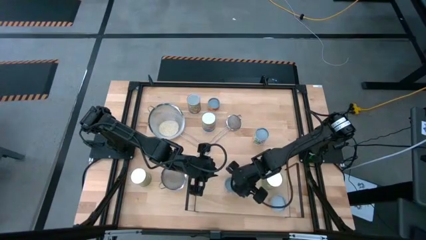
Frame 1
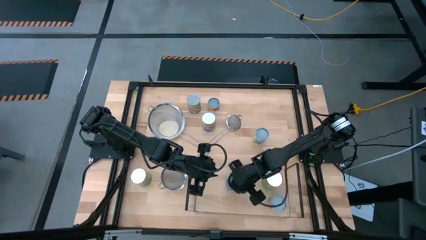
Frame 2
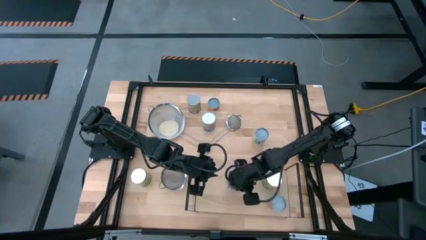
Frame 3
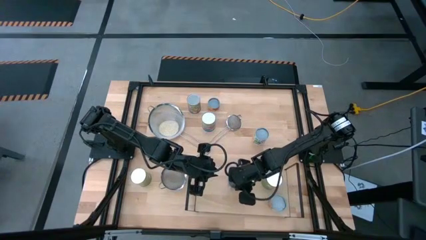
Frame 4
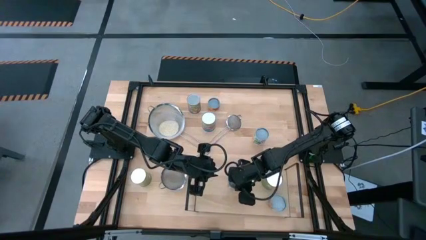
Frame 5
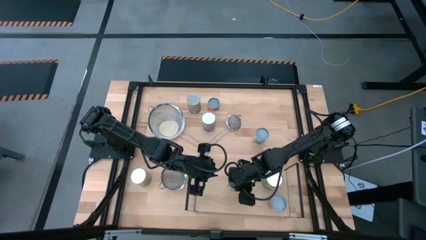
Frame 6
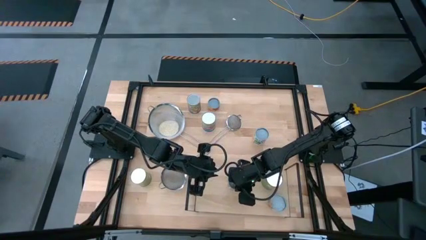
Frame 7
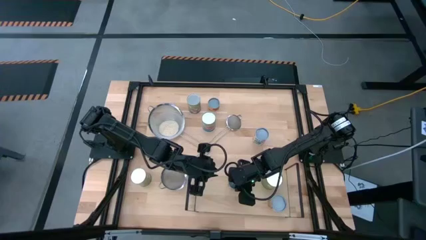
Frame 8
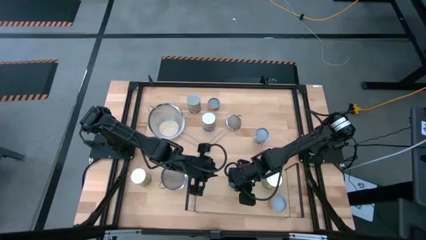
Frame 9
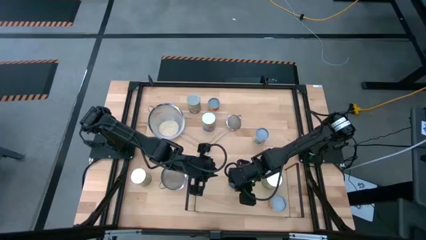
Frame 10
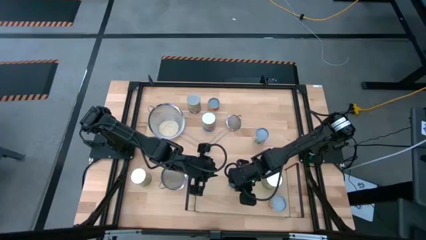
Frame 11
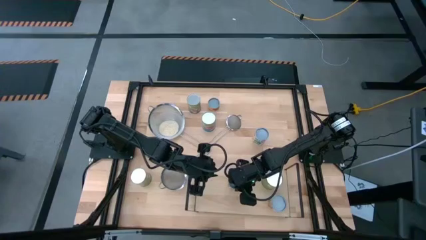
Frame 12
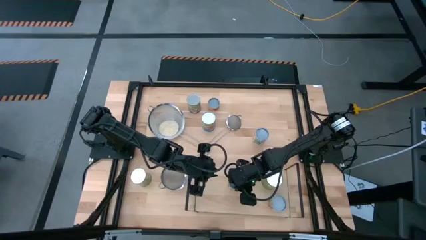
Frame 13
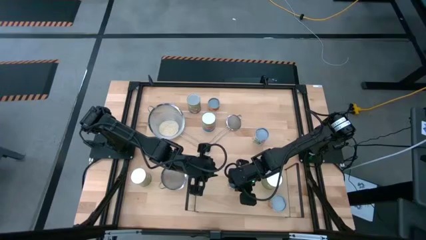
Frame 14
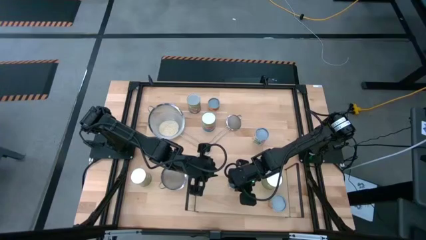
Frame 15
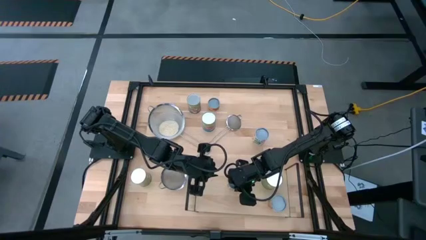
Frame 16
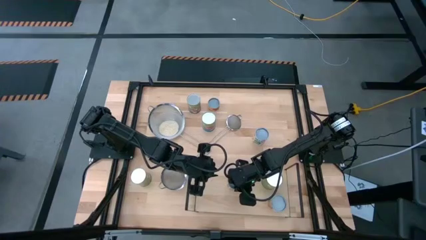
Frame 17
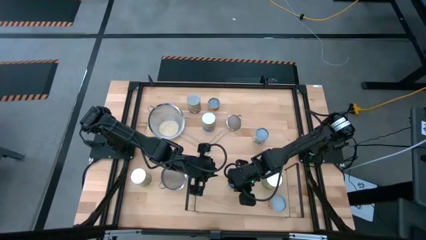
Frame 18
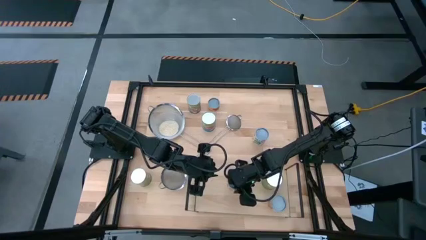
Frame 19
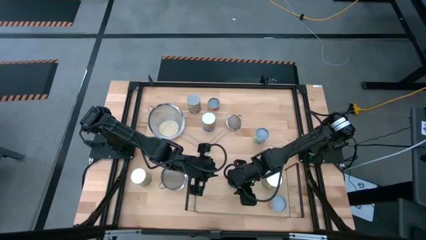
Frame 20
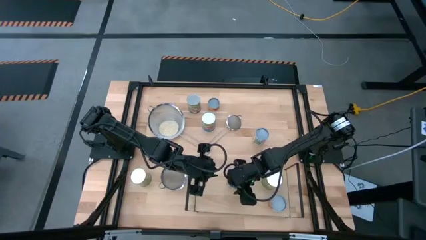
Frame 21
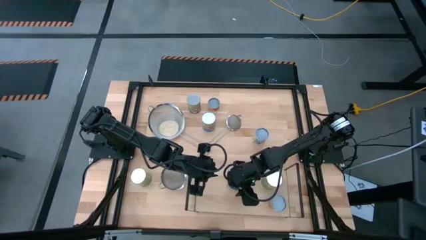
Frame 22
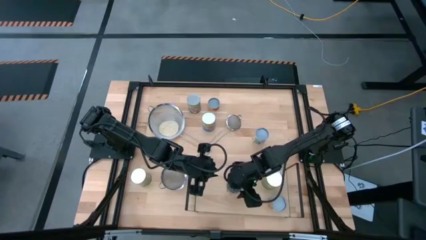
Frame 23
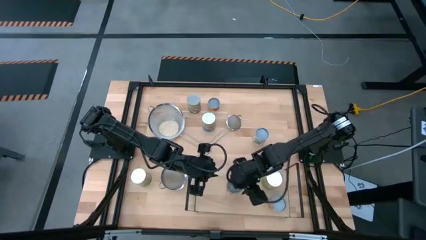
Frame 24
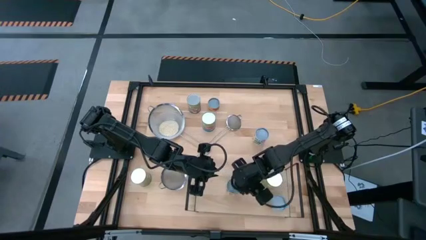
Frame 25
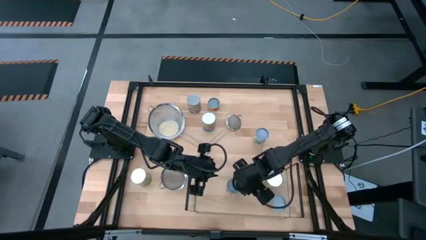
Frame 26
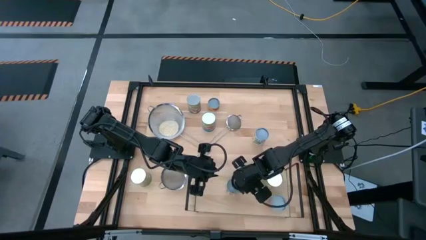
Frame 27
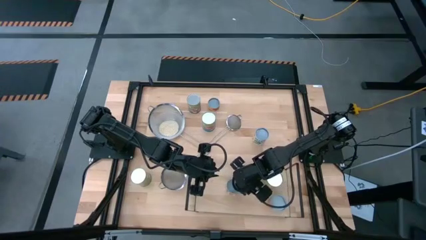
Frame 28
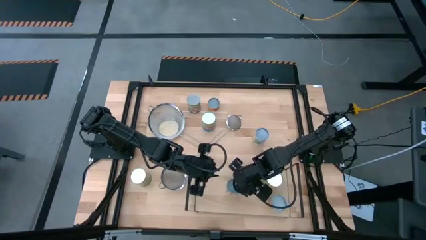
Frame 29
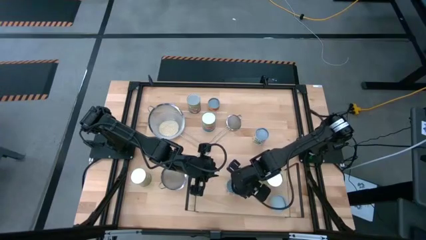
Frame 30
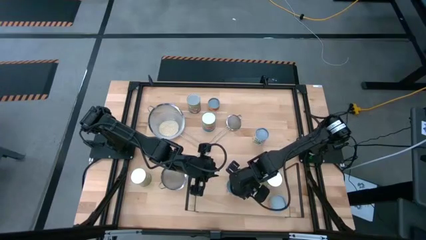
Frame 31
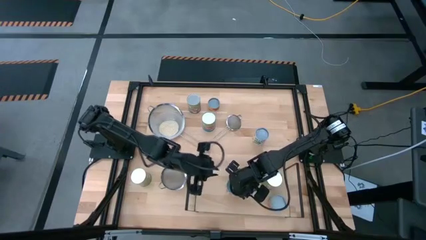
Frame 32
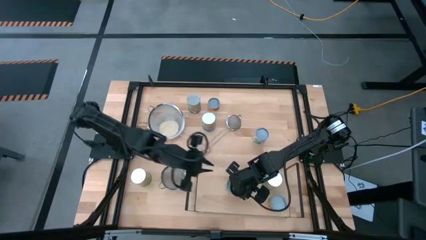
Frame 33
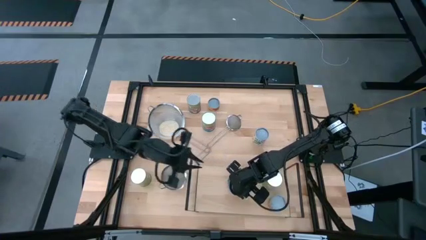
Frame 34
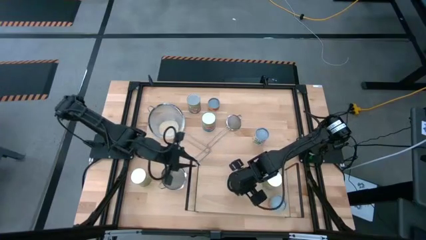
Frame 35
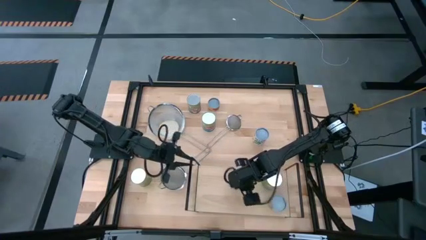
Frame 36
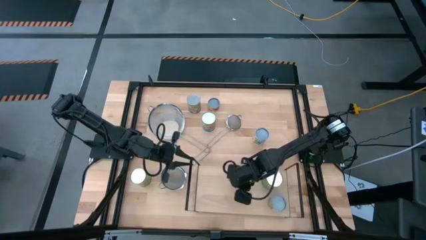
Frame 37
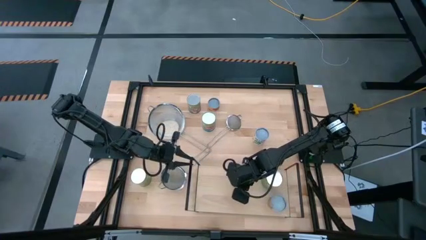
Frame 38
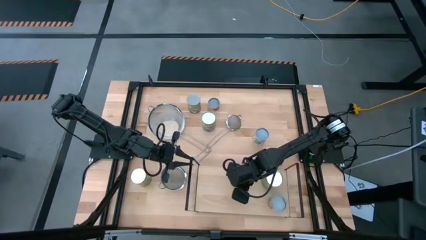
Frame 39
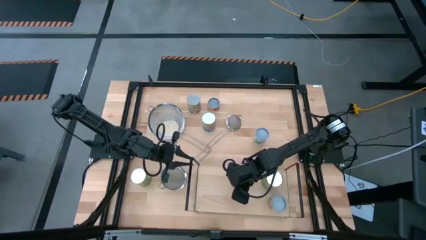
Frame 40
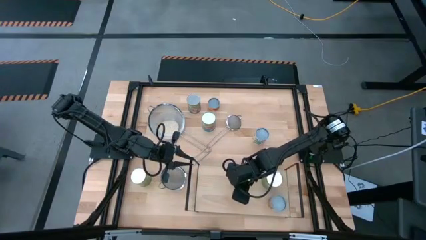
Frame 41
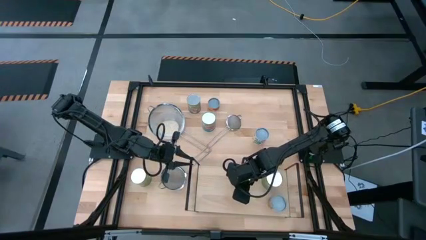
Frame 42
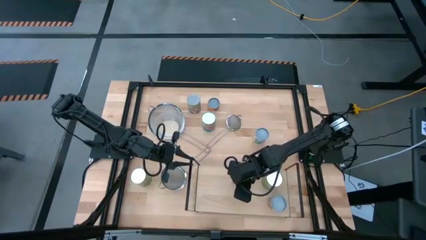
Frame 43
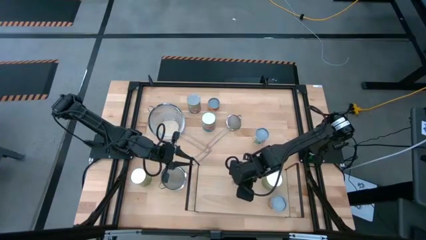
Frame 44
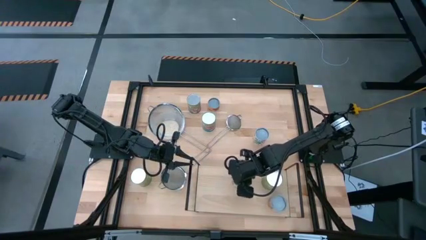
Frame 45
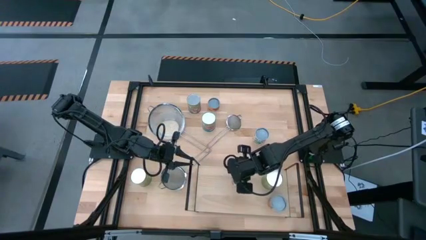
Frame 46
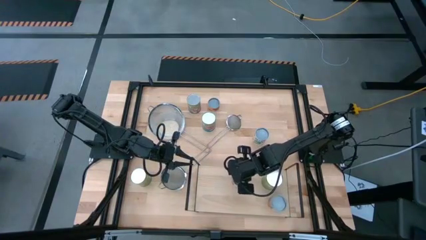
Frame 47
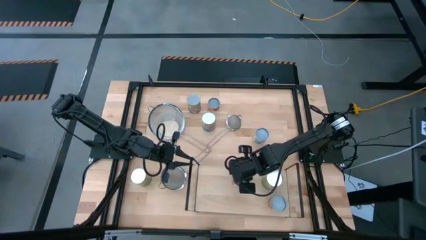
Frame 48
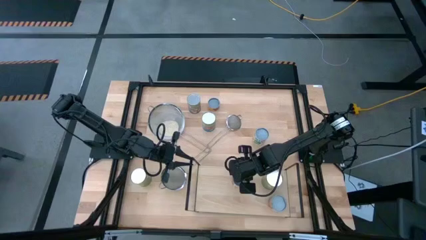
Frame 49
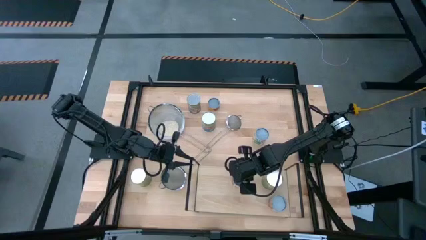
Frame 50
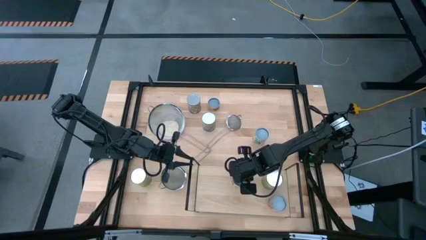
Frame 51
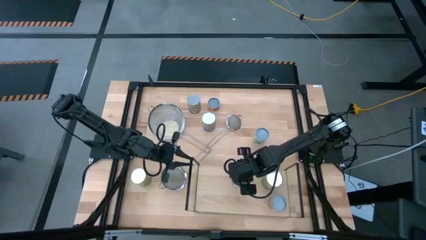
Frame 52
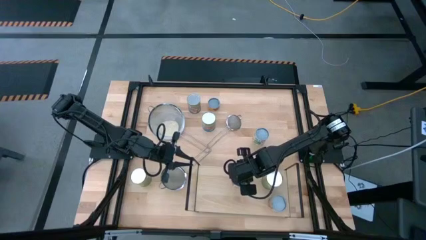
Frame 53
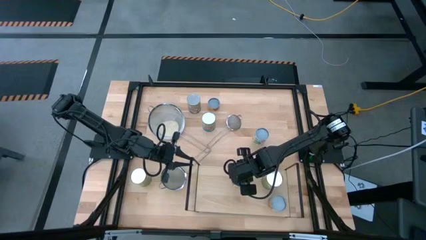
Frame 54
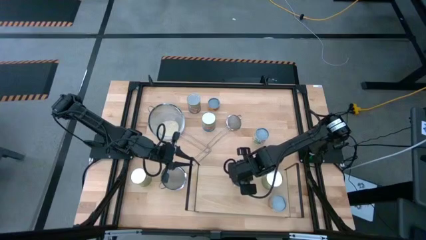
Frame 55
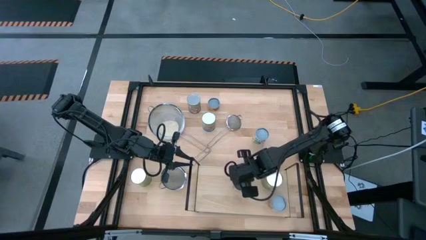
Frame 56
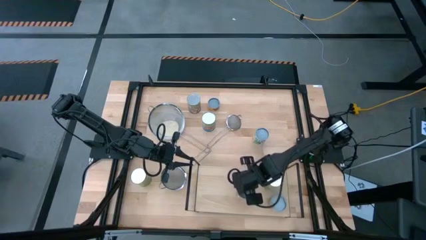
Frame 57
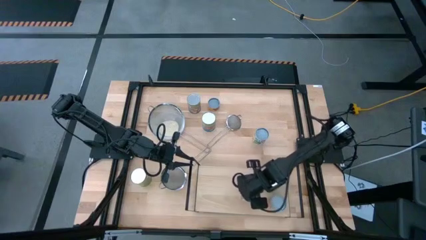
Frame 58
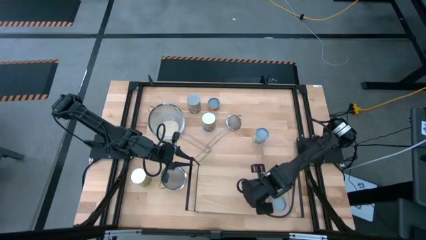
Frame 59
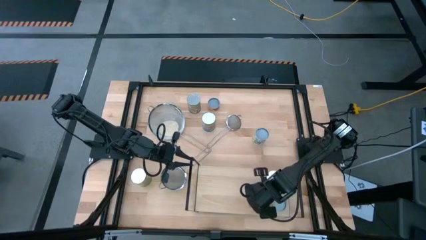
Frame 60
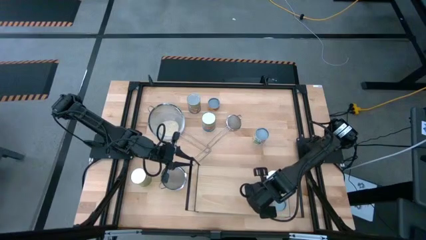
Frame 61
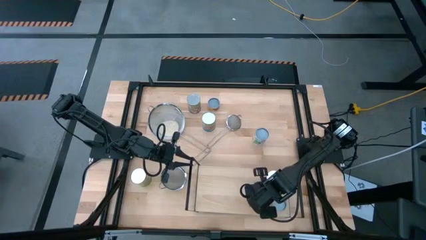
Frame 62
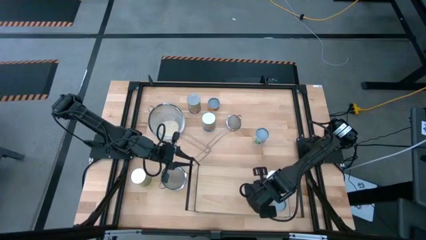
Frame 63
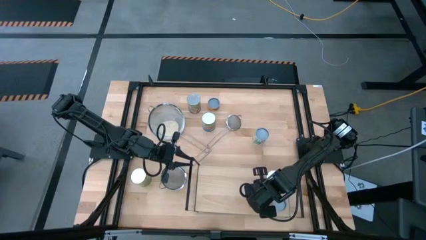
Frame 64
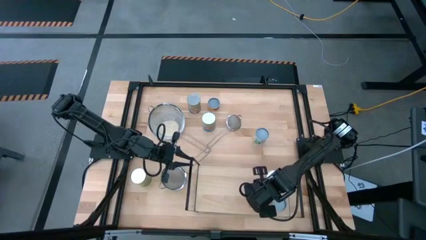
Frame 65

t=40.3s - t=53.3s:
Task: Pick and place cans onto a shelf
Put the small canned tomatoes on the shelf
